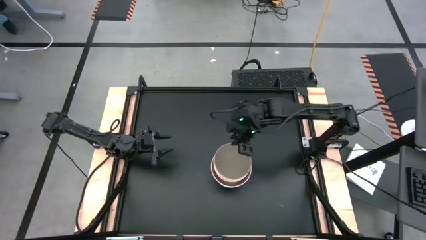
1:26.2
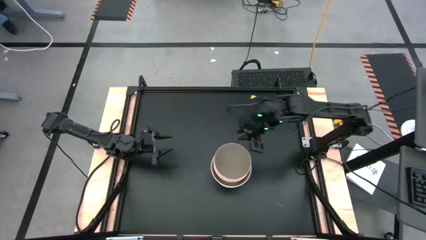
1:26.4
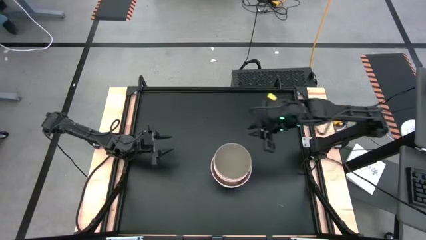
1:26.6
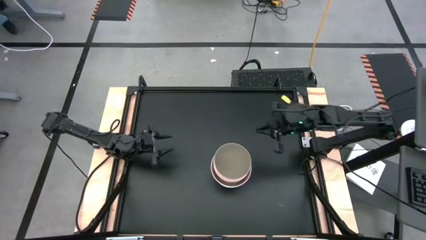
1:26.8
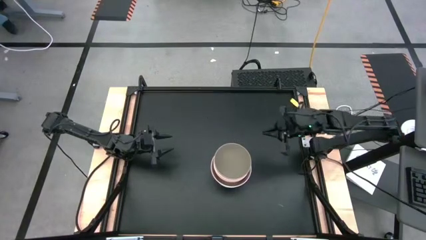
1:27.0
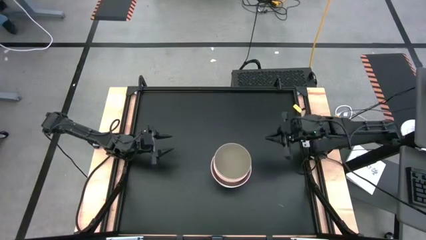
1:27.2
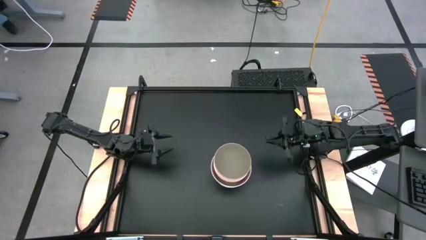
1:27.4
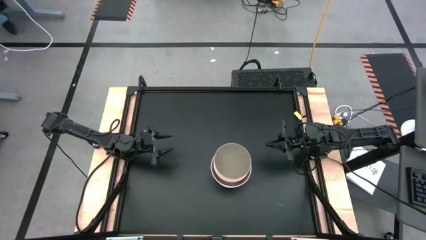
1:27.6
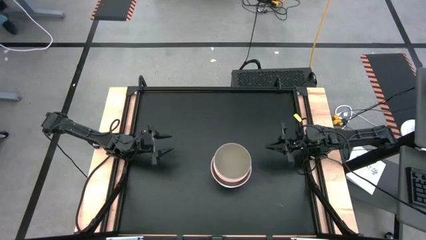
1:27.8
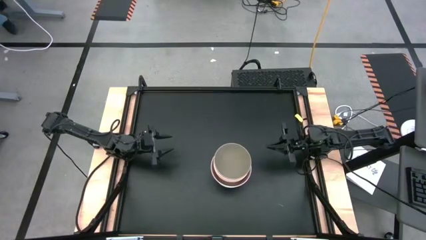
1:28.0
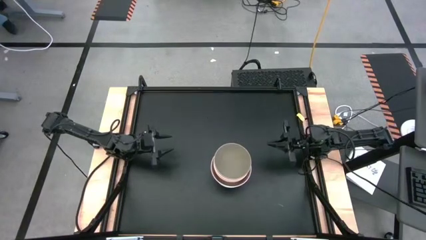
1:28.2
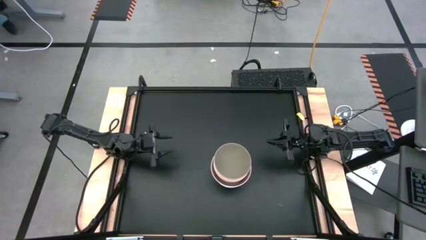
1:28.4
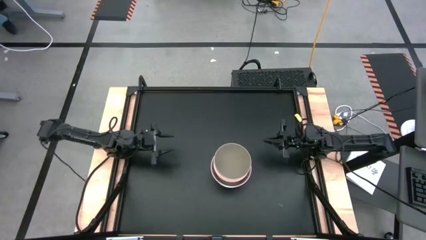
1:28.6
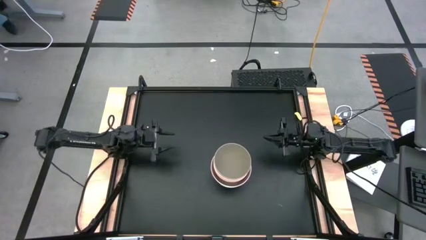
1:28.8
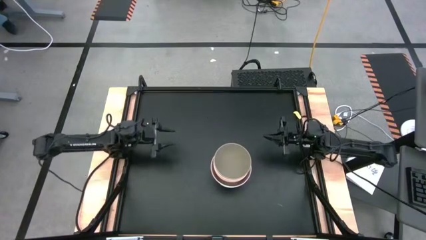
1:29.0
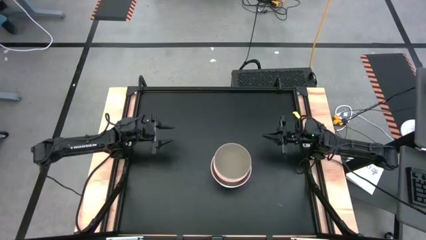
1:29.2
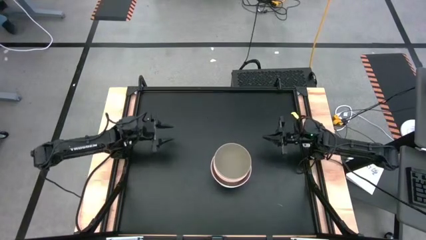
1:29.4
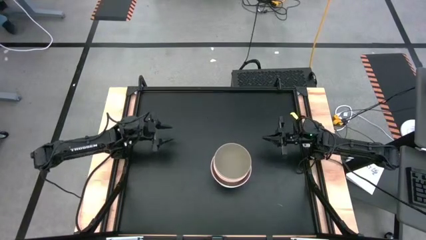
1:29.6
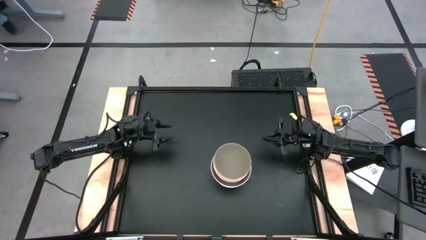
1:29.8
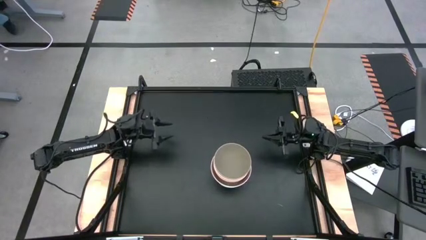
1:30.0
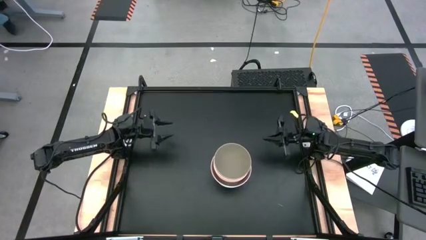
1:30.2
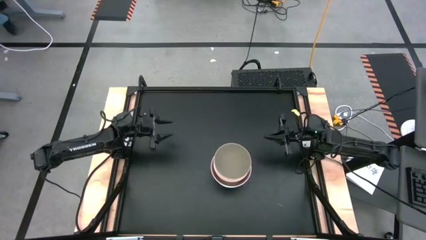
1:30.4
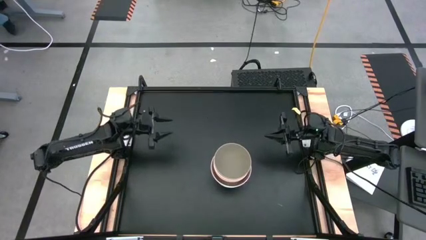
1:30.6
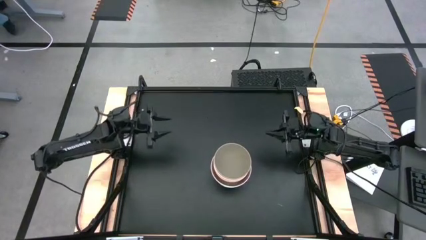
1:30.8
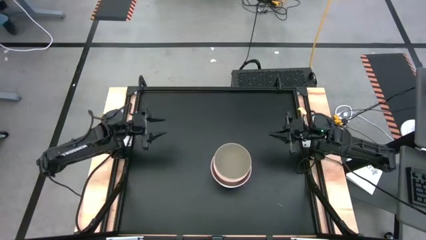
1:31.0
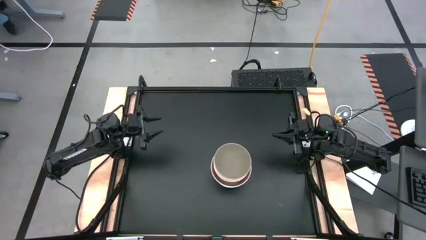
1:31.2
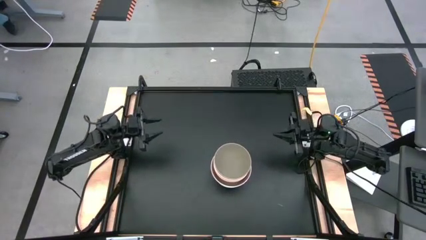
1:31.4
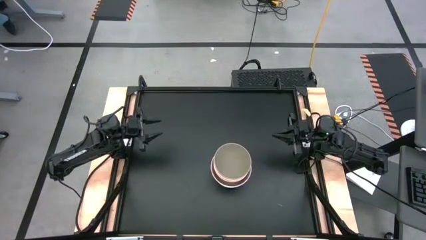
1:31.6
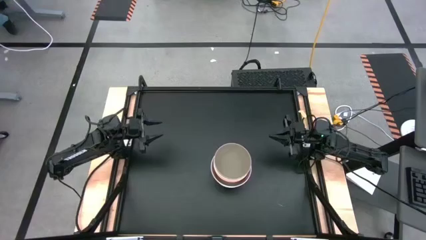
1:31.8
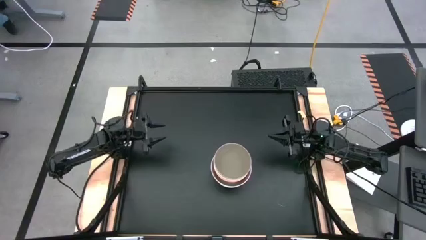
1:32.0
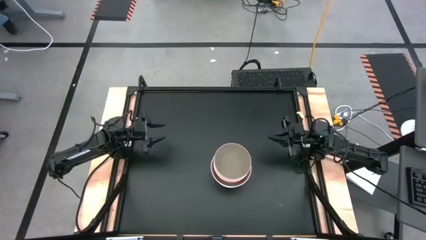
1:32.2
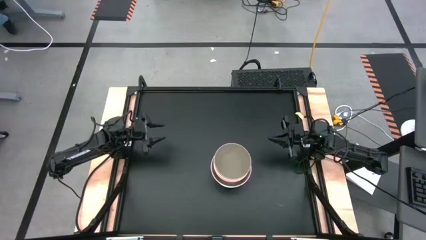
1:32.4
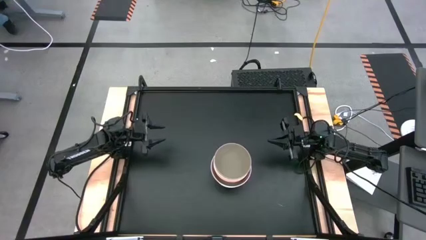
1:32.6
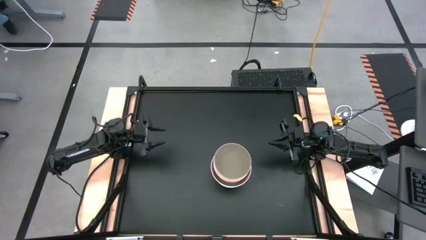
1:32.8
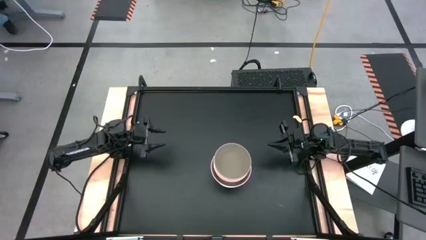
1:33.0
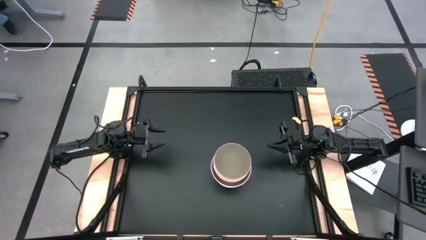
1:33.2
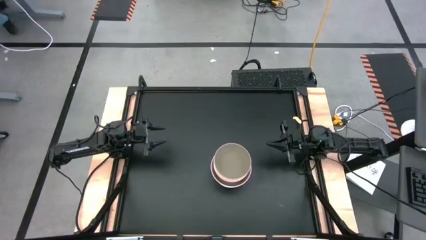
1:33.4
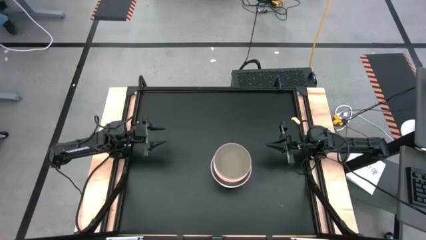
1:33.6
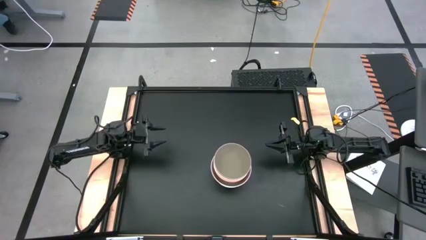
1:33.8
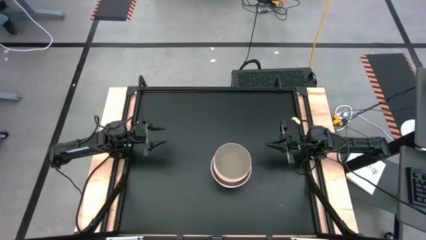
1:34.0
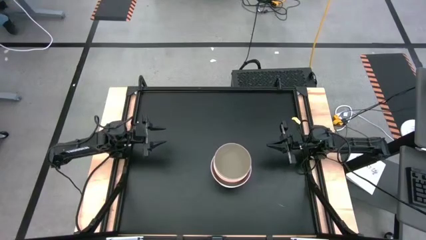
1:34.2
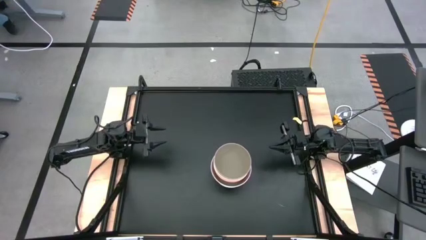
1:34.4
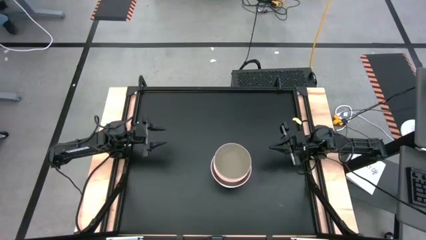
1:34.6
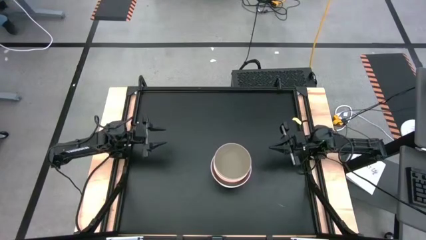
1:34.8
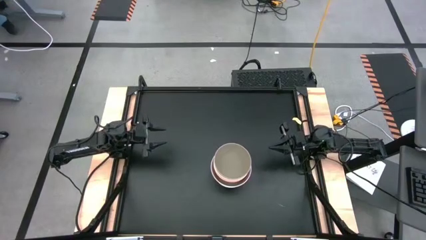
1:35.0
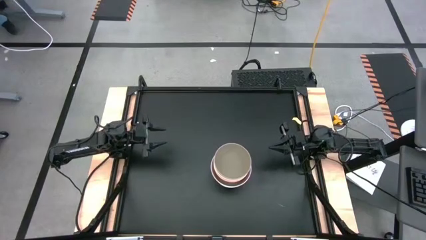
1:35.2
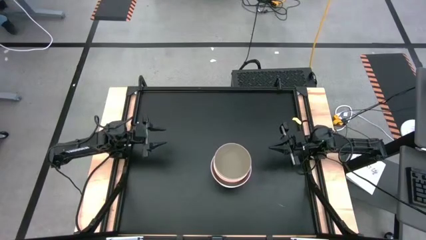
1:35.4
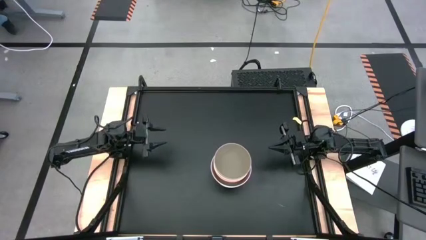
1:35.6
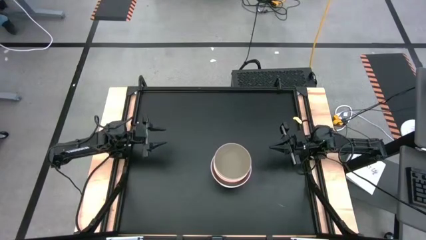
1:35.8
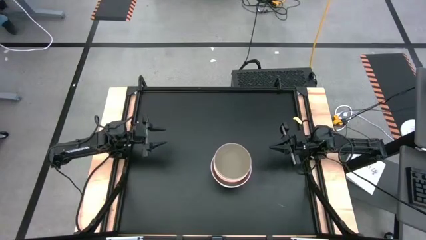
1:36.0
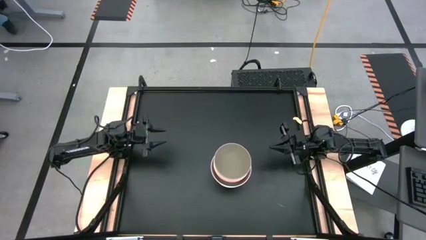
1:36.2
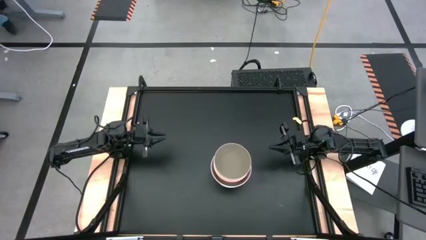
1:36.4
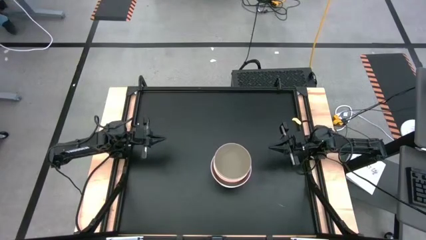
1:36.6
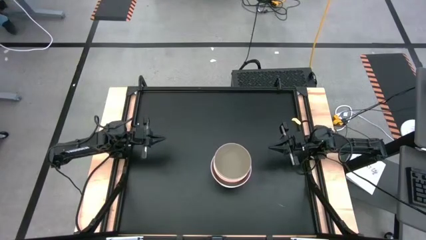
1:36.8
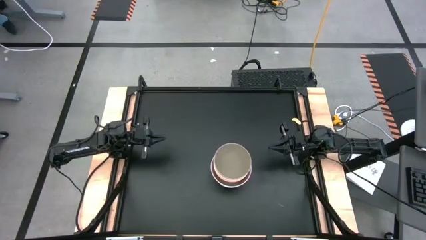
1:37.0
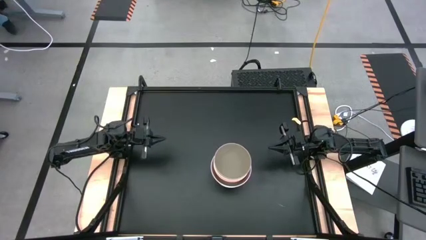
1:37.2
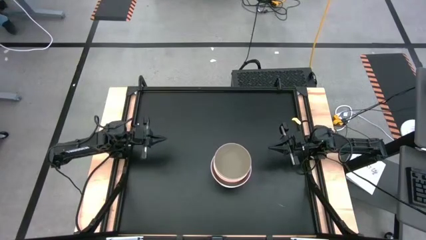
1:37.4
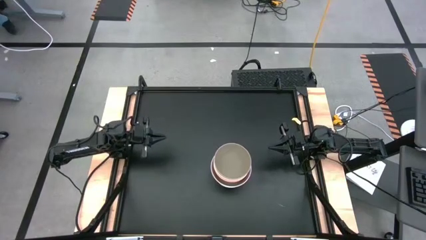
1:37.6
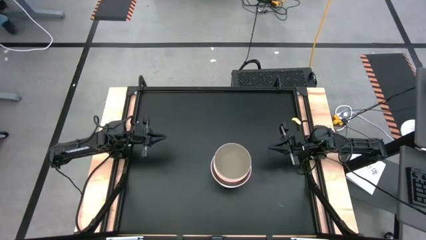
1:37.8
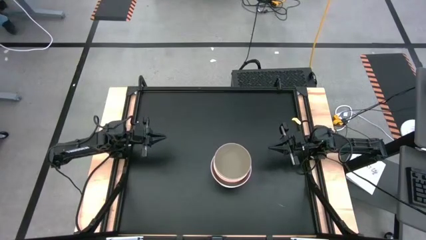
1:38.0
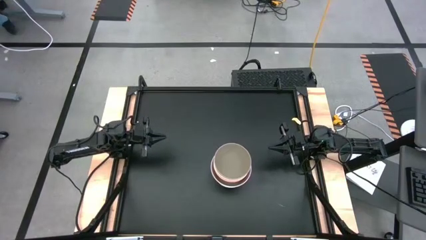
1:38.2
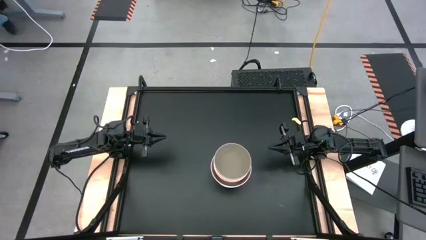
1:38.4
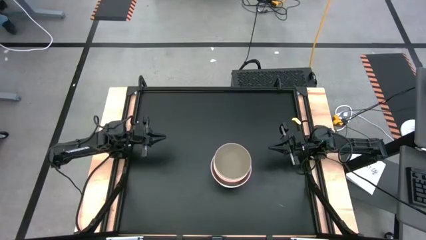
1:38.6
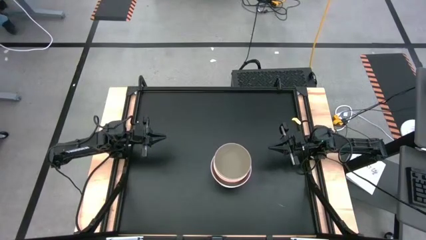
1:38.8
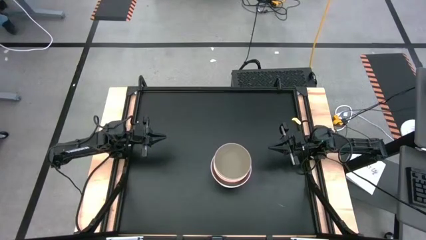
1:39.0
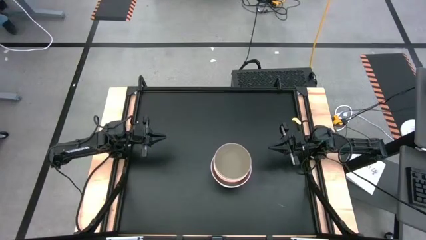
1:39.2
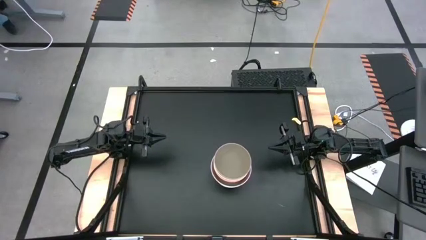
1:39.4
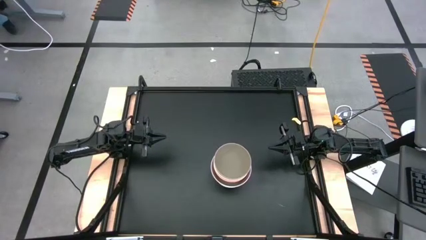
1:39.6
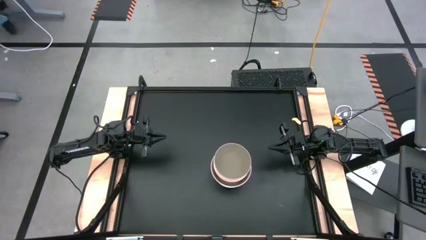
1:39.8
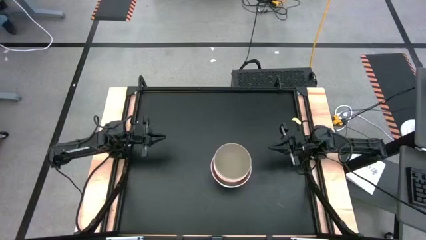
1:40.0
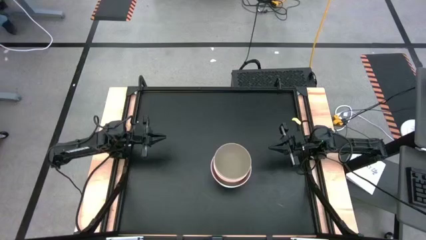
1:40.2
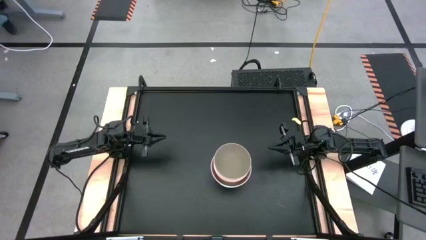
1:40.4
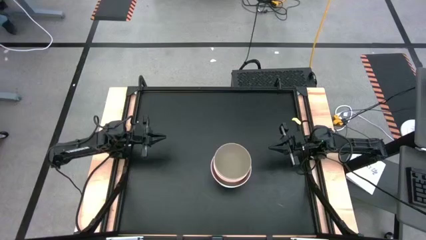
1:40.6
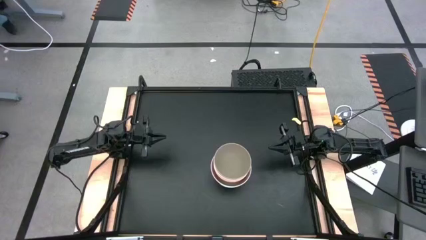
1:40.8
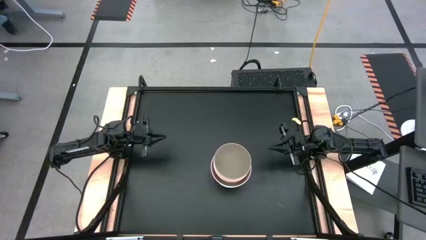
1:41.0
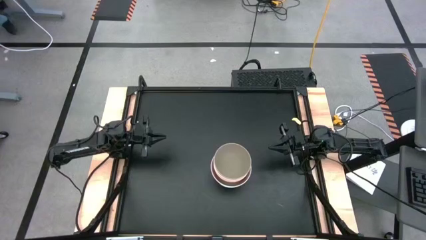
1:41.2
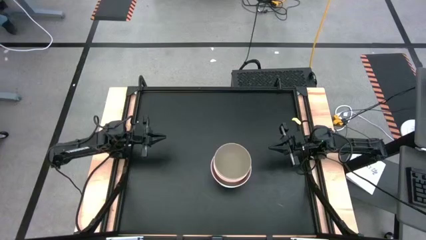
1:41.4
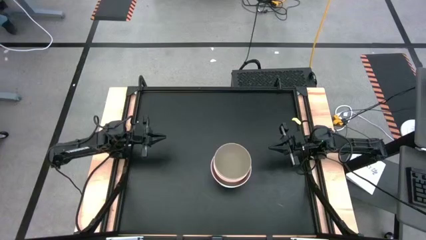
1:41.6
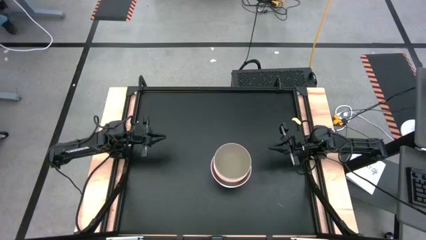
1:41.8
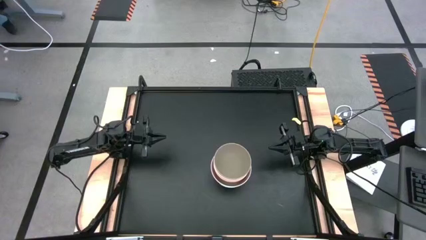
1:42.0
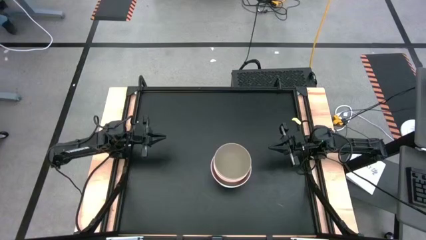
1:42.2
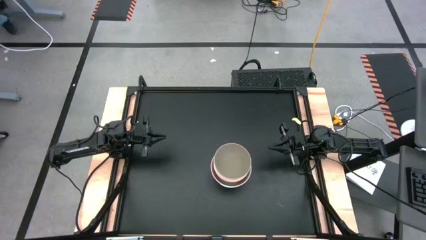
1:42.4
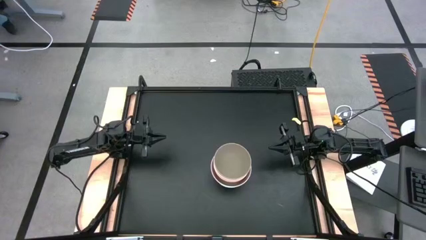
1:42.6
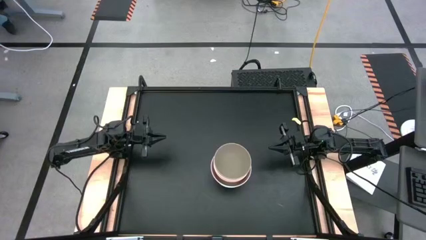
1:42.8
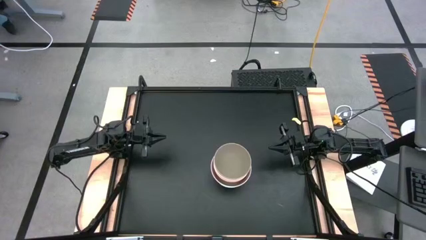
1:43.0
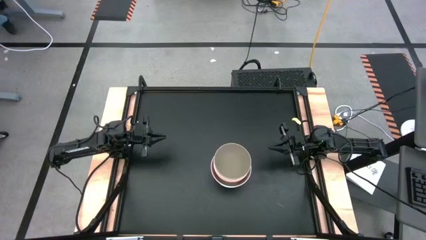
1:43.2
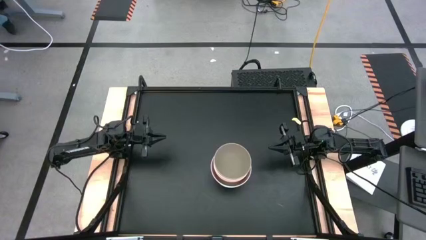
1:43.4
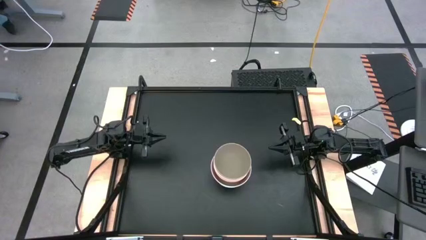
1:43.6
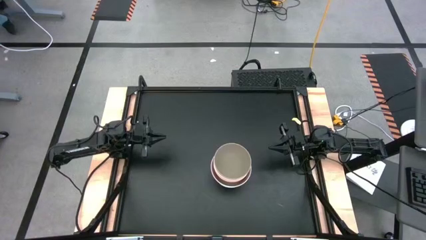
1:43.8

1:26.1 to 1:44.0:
Task: Nest bowls inside each other
Return to Home Position
